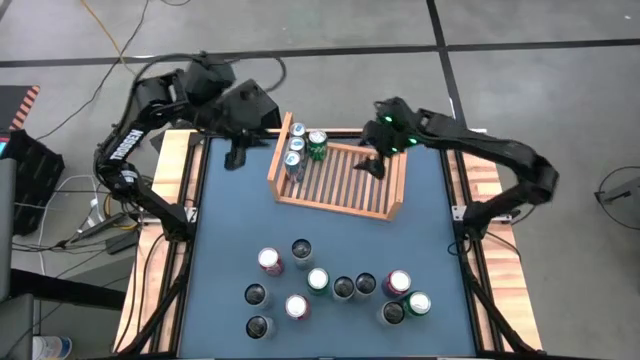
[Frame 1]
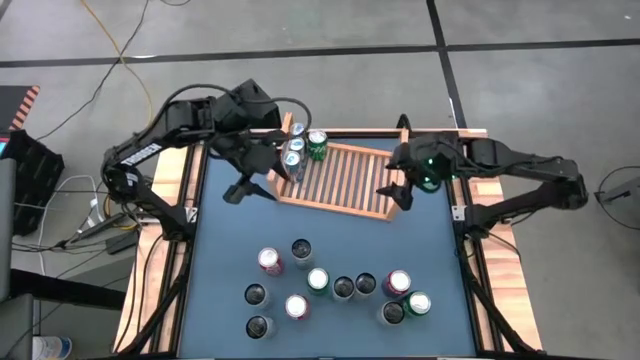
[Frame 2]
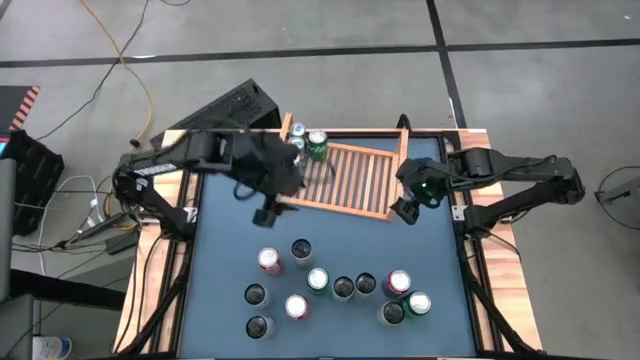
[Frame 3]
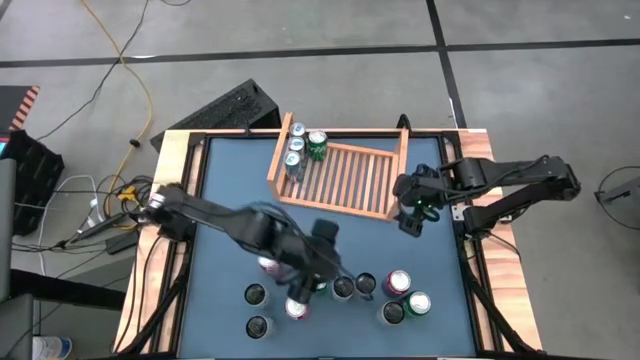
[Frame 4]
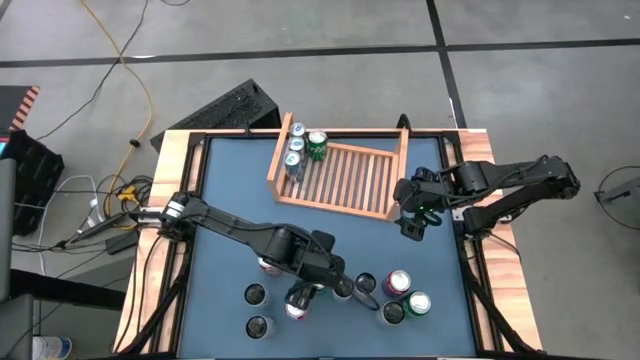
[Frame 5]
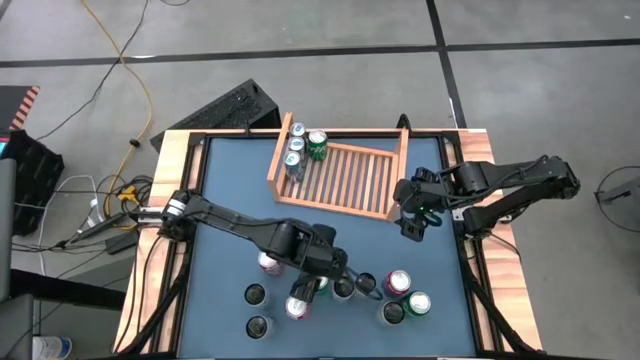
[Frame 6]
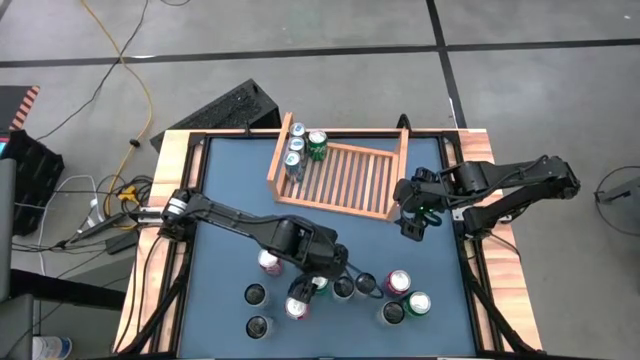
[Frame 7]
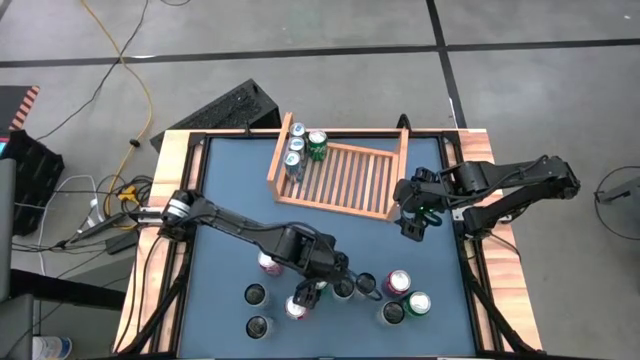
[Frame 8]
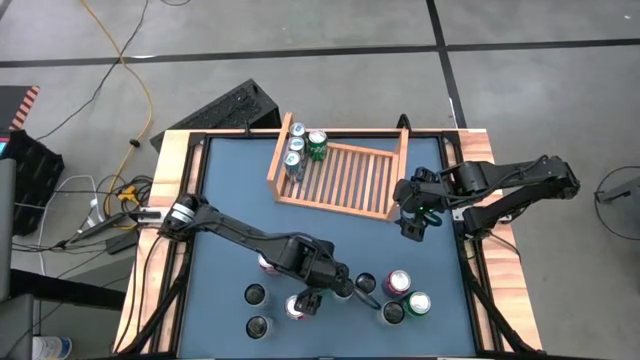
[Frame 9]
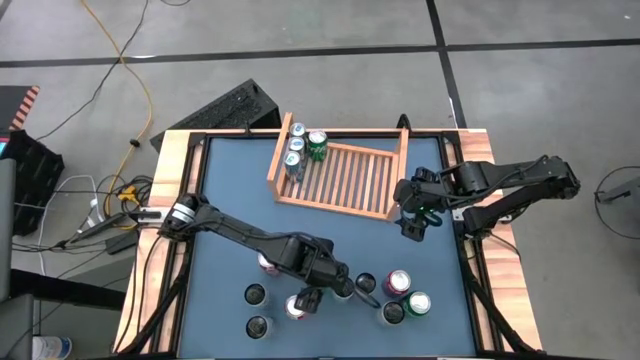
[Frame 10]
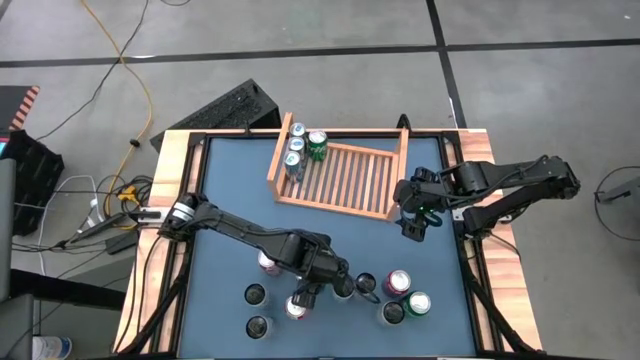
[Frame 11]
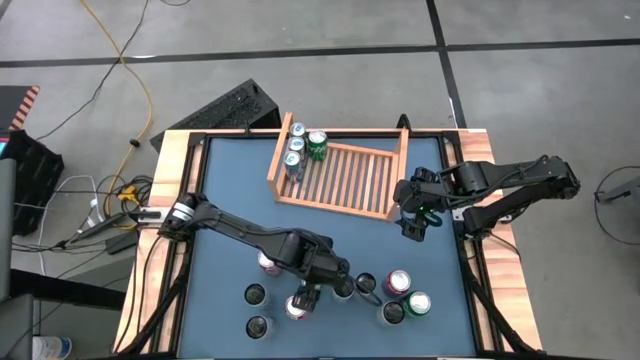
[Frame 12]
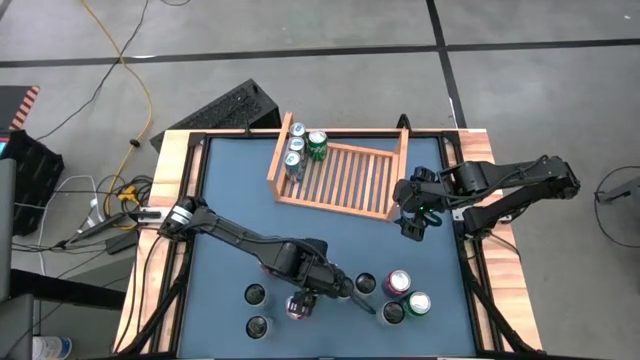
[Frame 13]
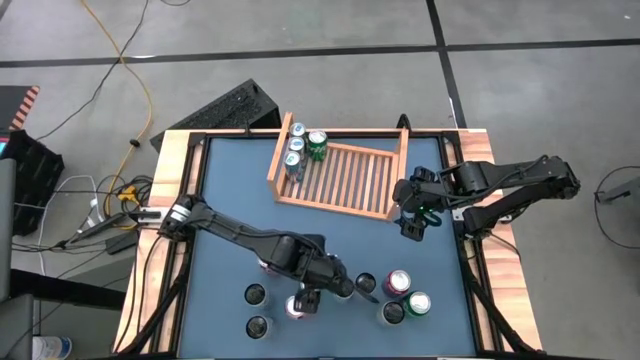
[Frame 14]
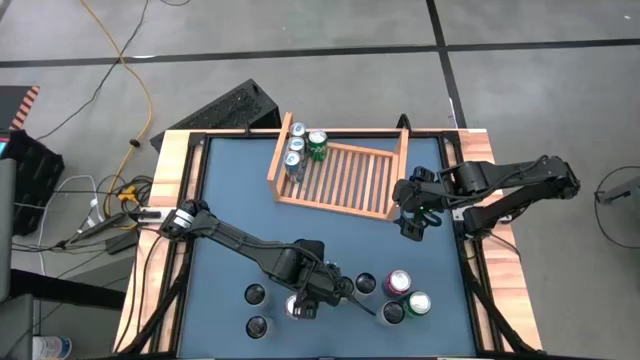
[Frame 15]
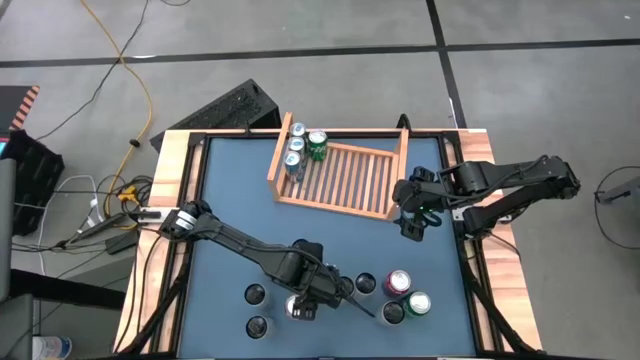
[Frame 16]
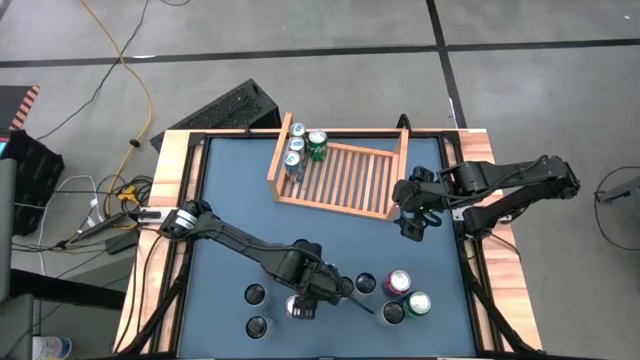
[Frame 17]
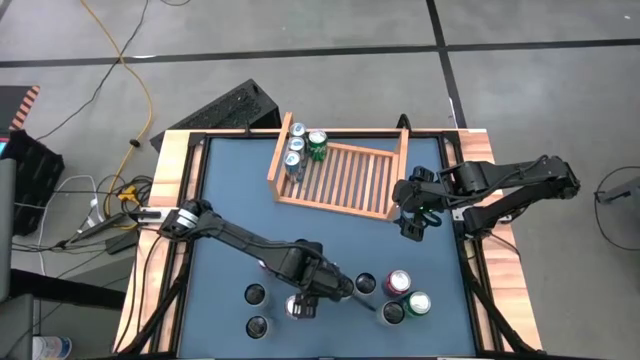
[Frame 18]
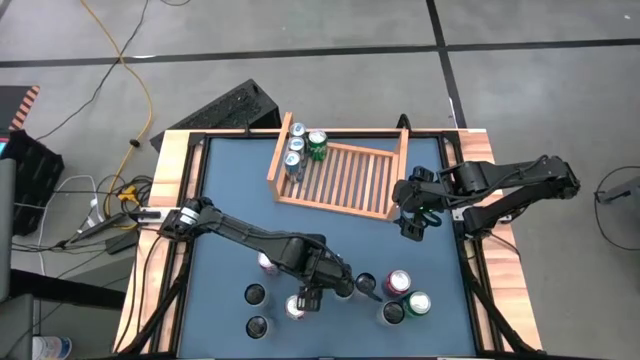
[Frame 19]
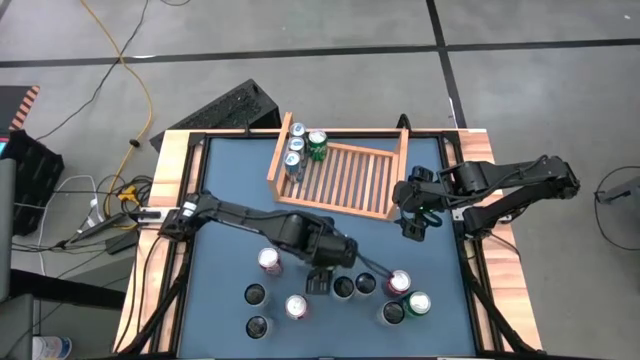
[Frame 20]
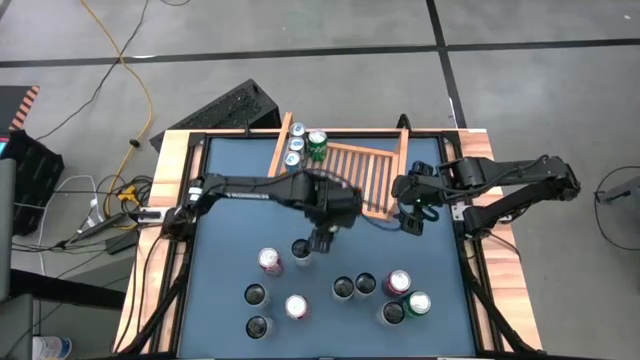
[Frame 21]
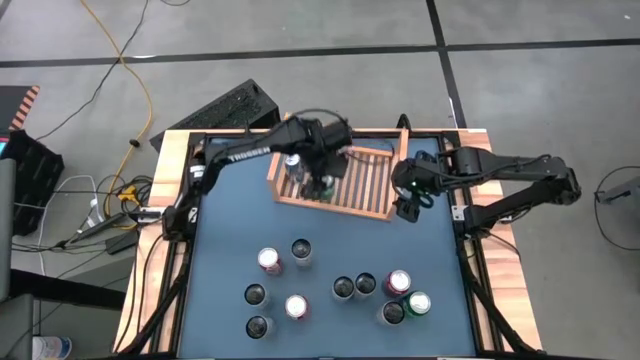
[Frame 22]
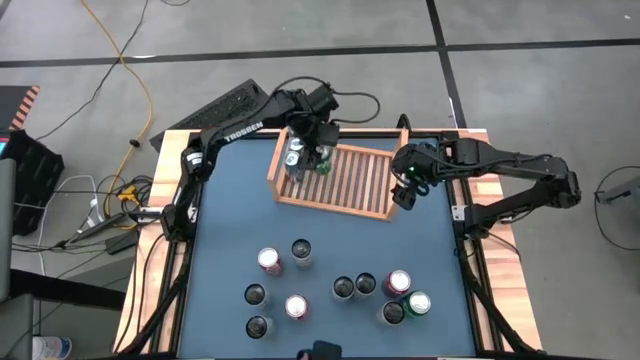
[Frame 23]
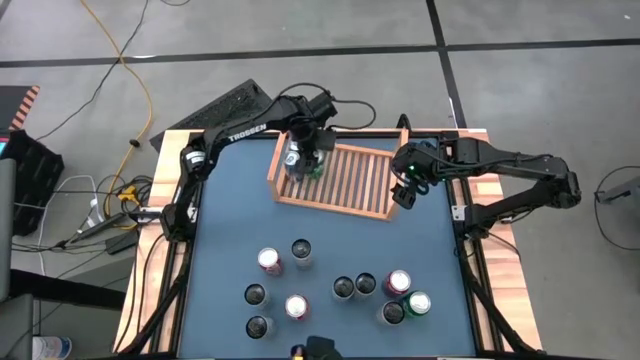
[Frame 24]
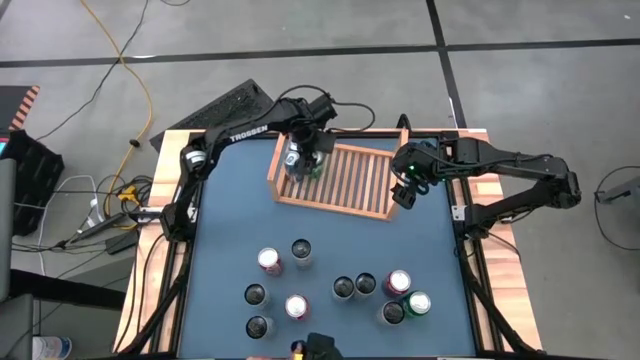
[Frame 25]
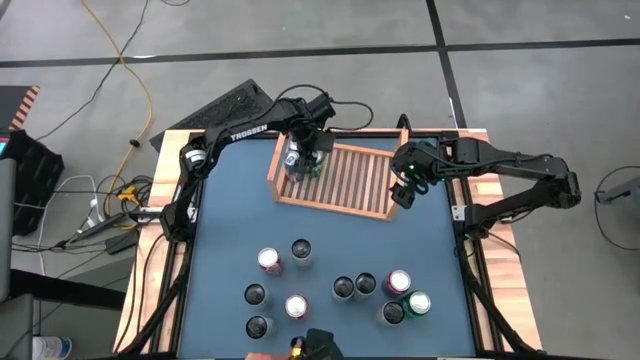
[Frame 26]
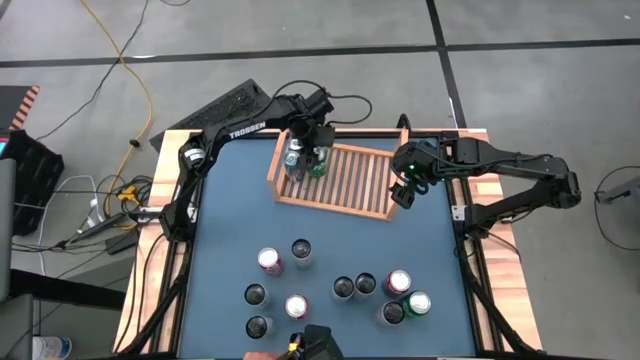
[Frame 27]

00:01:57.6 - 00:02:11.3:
Task: Place canned beverage on shelf
Put the green soda can on the shelf

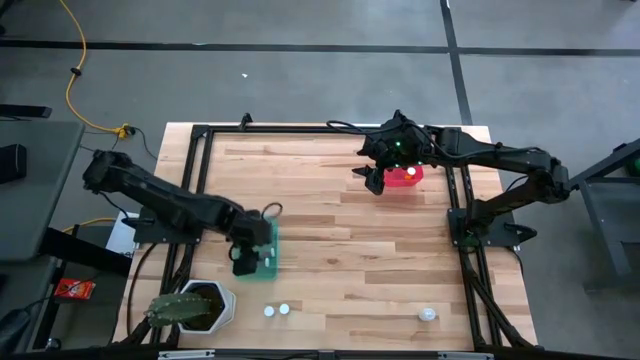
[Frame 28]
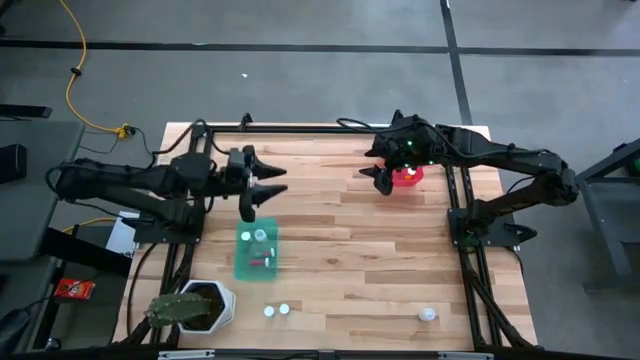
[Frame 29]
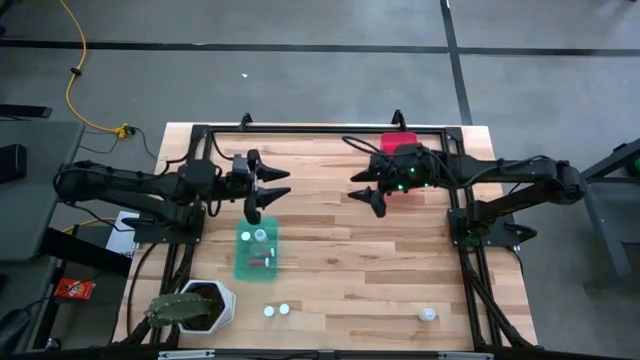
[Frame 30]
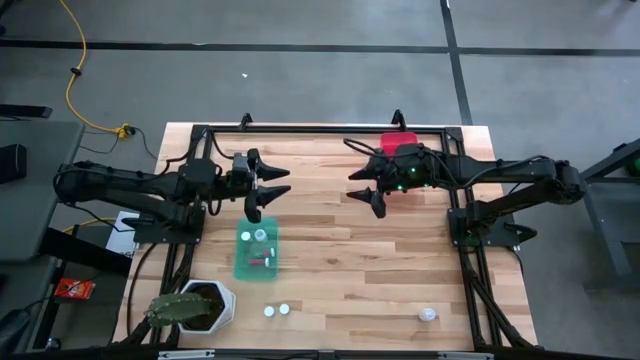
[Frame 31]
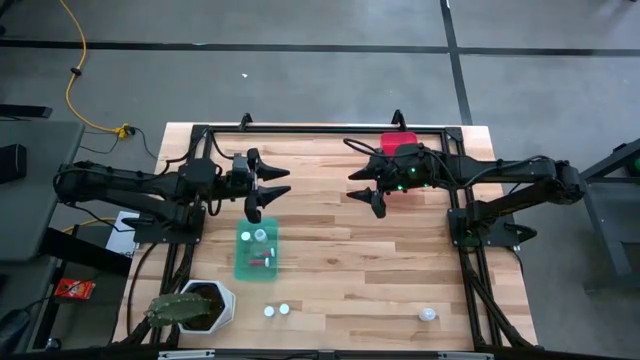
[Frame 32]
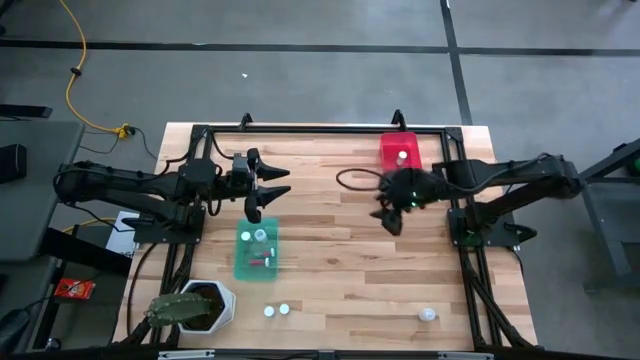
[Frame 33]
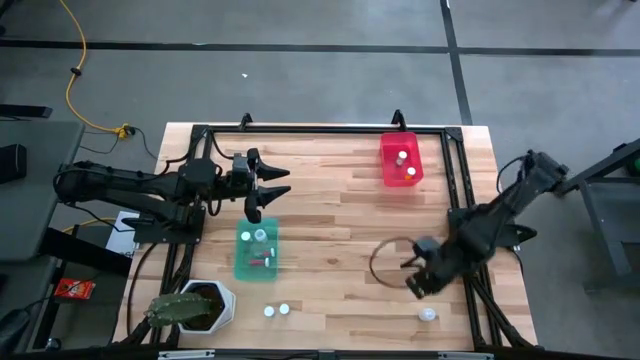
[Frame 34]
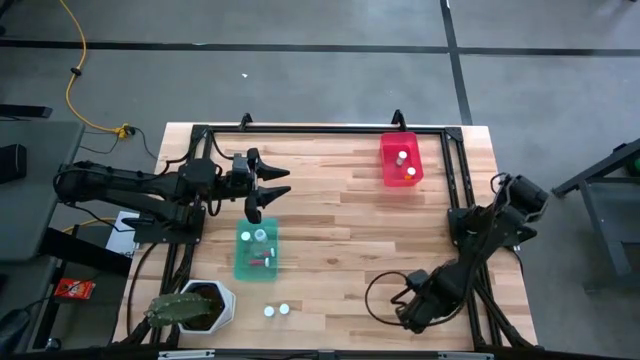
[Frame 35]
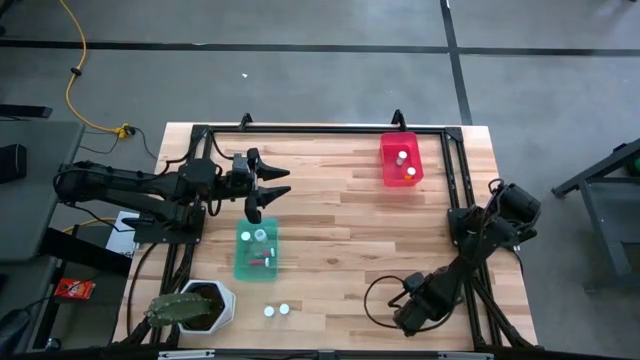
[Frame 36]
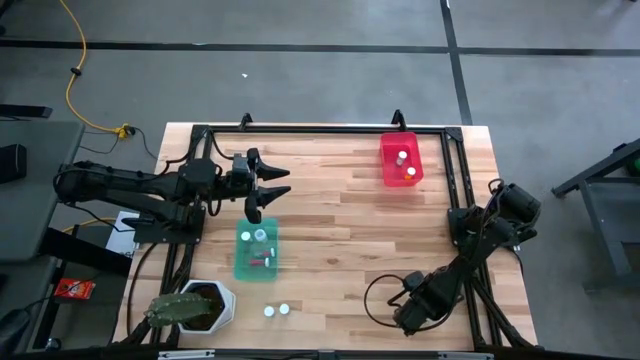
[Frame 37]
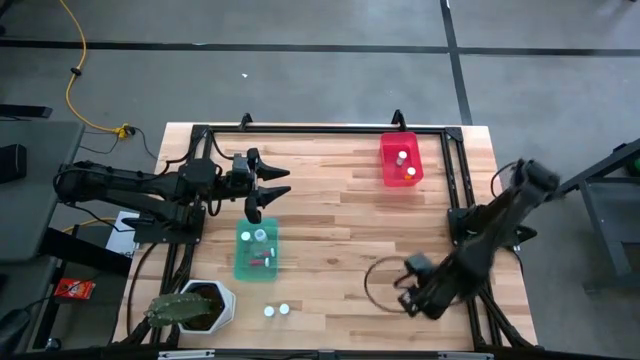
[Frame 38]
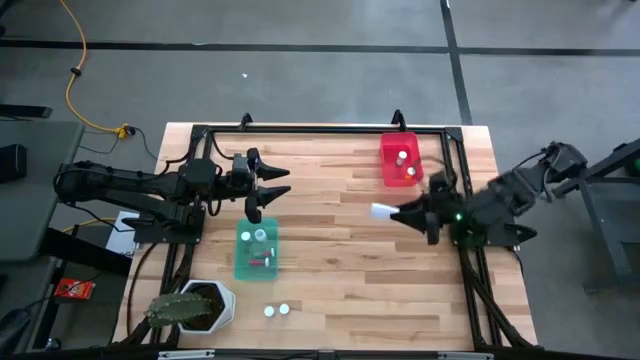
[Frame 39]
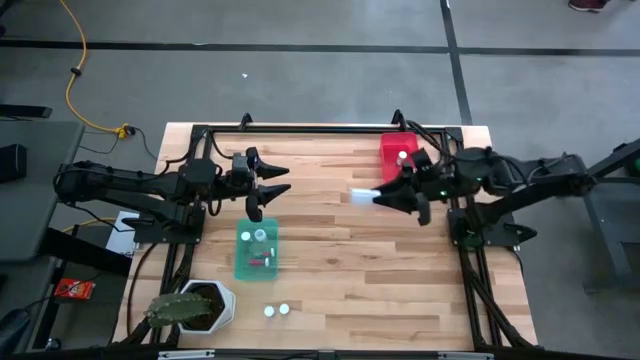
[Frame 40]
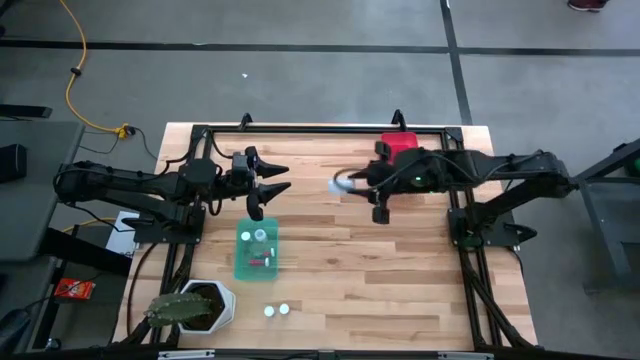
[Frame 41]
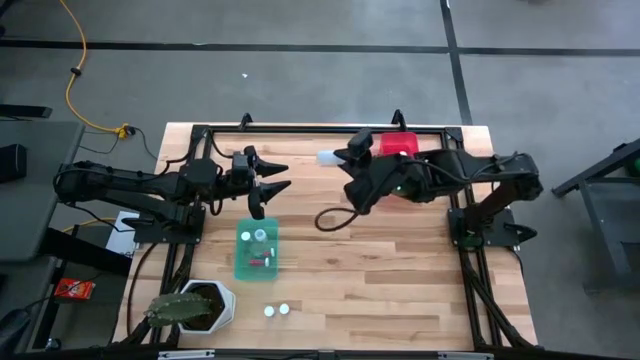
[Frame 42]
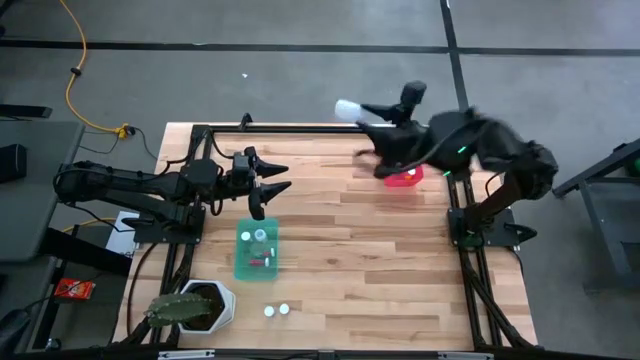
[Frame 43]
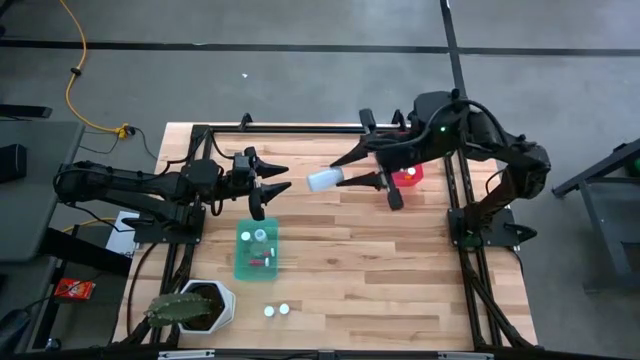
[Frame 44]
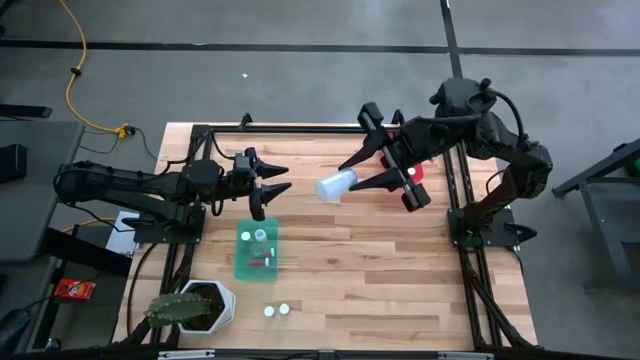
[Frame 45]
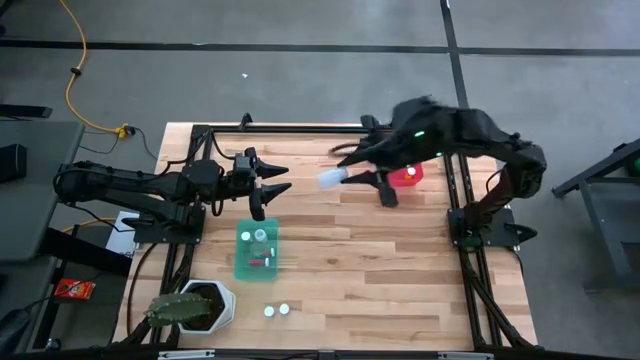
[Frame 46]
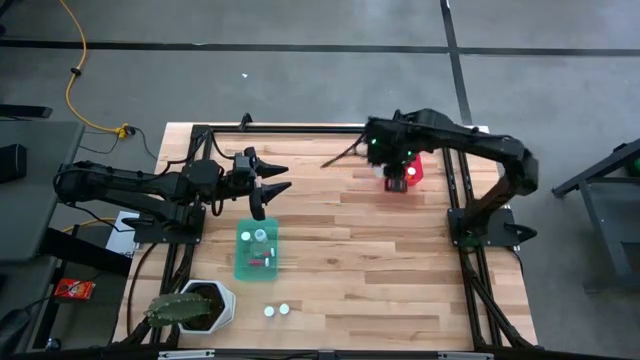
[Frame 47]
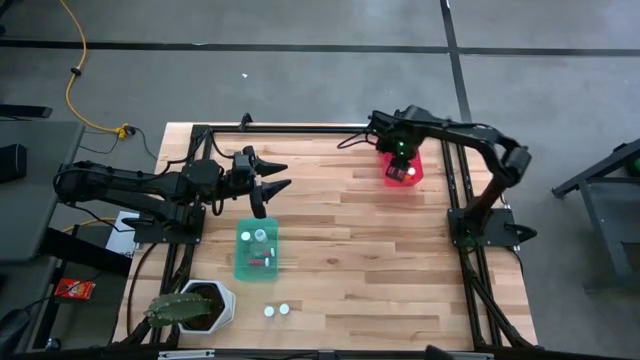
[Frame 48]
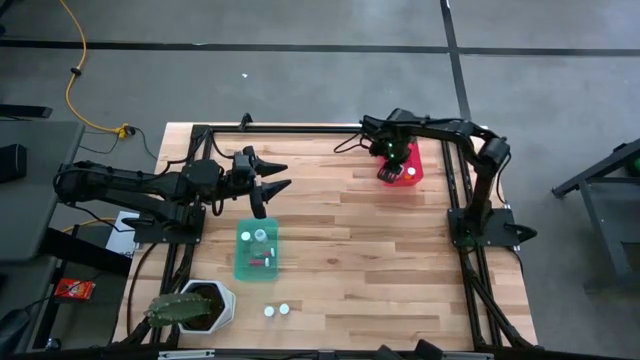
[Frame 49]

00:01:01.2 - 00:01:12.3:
Task: Pick and place medicine bottles into bin by pill shape (circle, oval)
Put the white tablet bottle into the red bin
